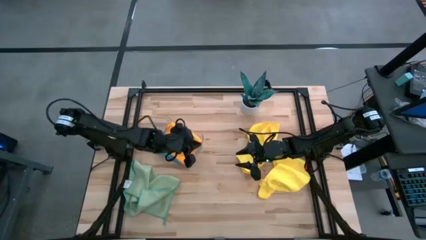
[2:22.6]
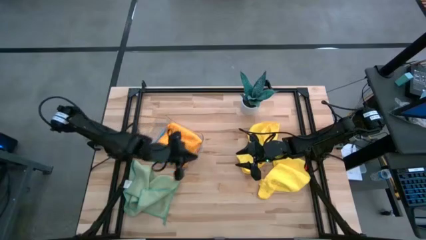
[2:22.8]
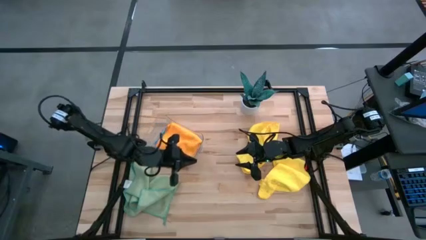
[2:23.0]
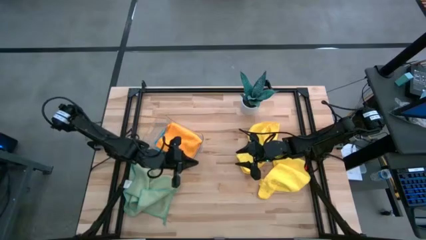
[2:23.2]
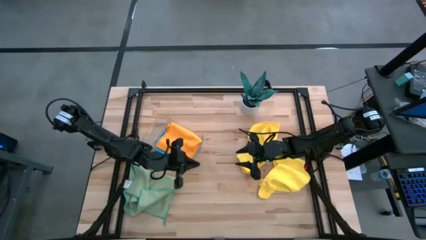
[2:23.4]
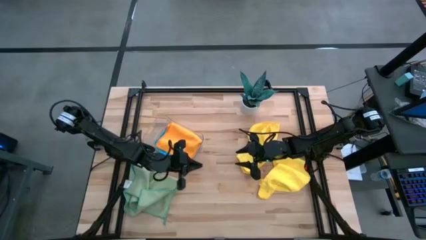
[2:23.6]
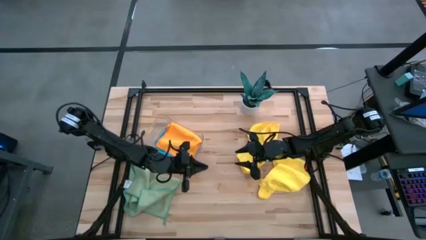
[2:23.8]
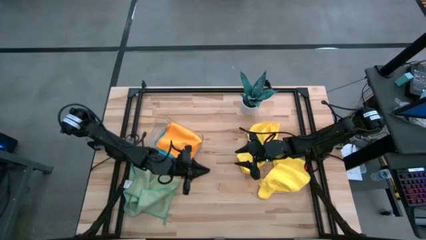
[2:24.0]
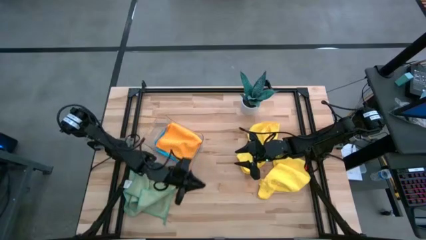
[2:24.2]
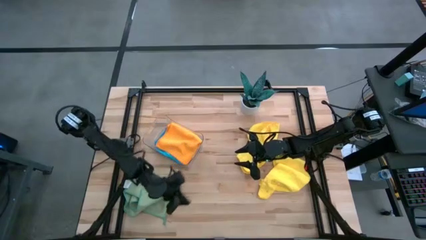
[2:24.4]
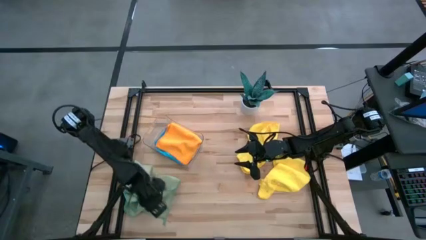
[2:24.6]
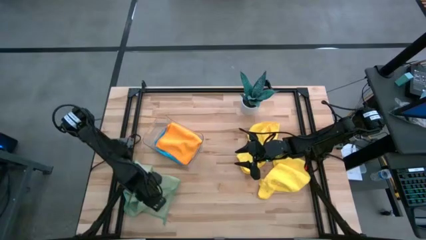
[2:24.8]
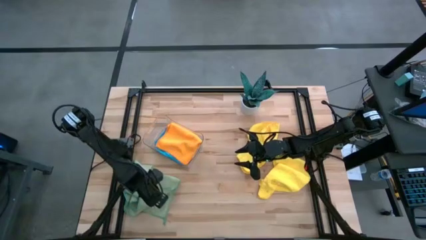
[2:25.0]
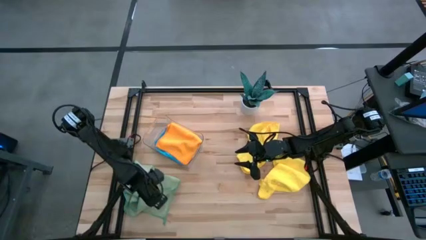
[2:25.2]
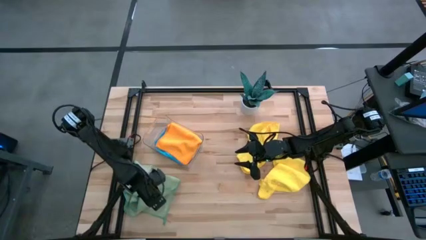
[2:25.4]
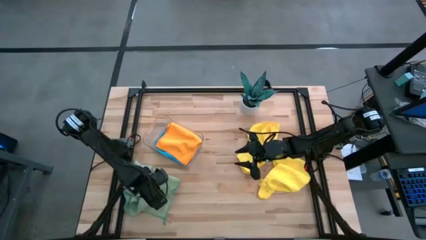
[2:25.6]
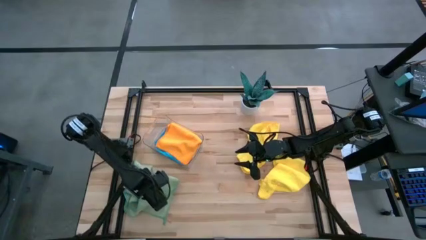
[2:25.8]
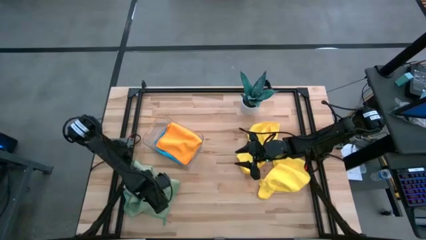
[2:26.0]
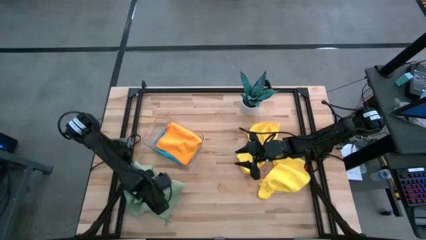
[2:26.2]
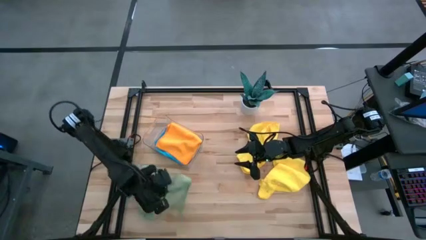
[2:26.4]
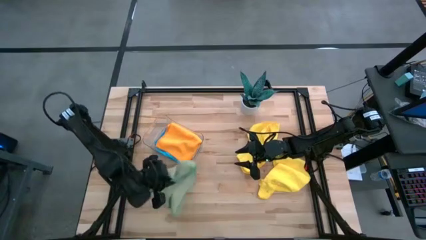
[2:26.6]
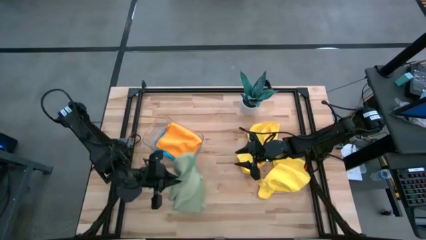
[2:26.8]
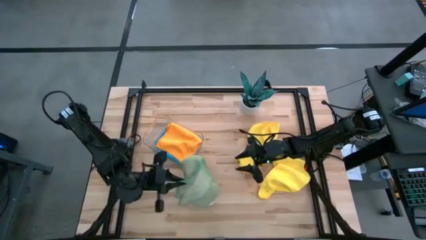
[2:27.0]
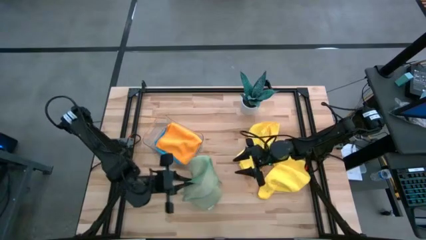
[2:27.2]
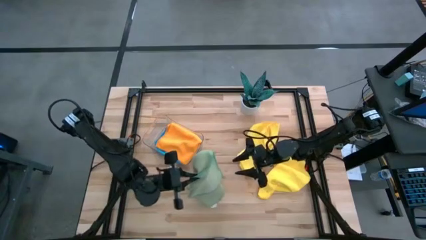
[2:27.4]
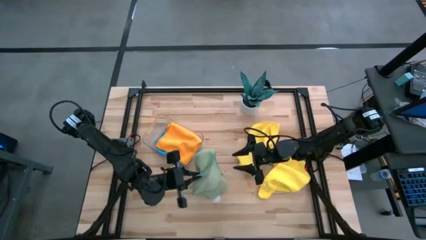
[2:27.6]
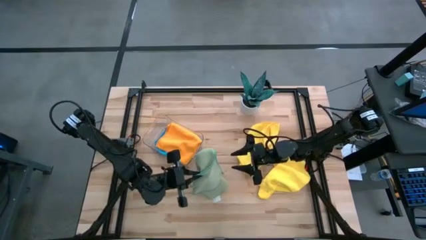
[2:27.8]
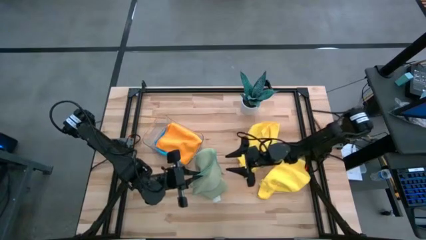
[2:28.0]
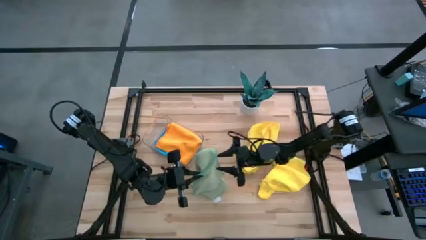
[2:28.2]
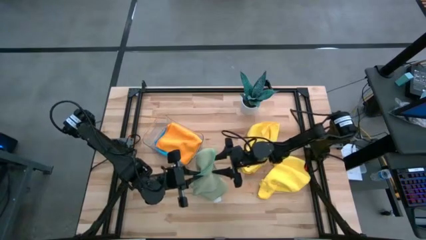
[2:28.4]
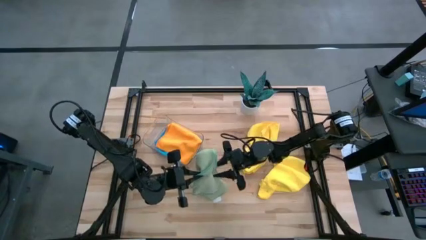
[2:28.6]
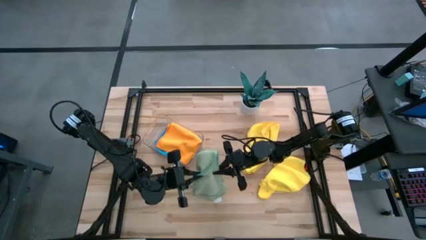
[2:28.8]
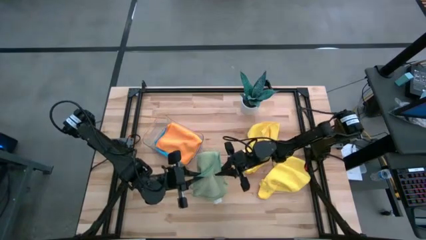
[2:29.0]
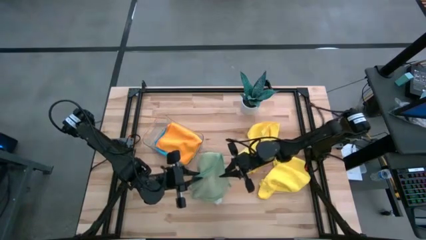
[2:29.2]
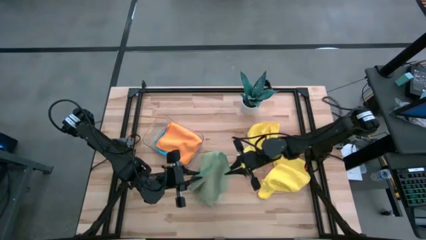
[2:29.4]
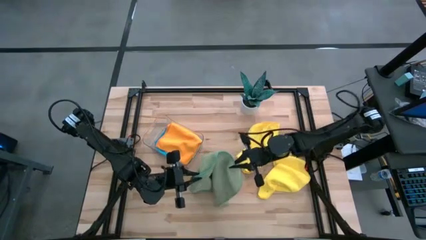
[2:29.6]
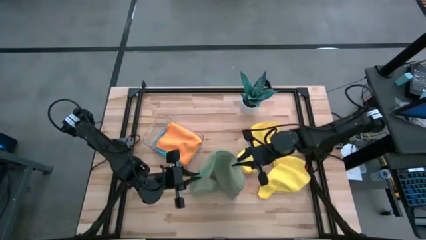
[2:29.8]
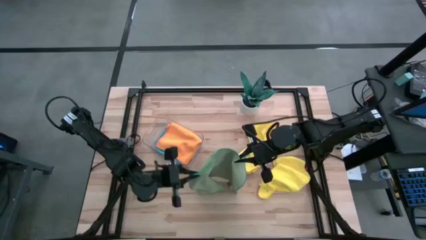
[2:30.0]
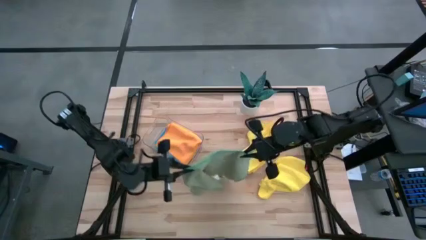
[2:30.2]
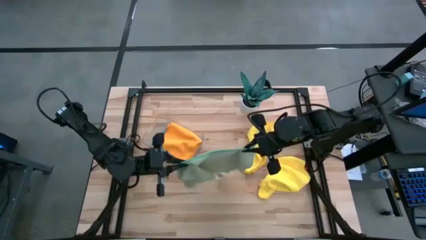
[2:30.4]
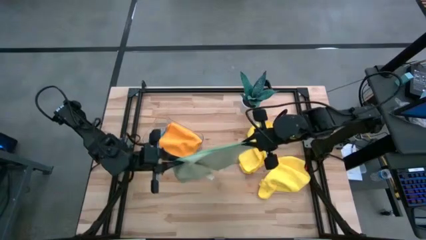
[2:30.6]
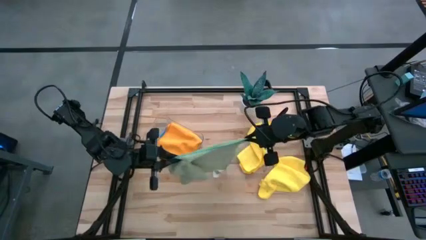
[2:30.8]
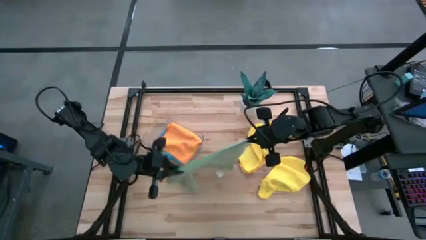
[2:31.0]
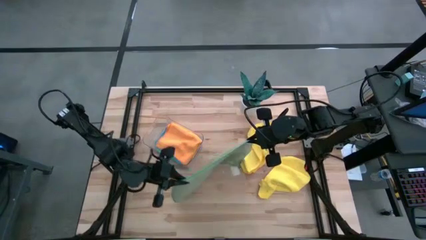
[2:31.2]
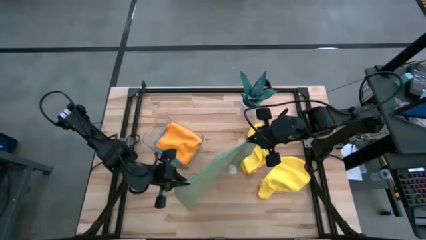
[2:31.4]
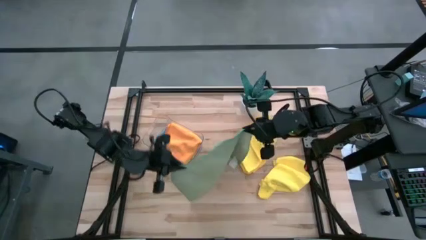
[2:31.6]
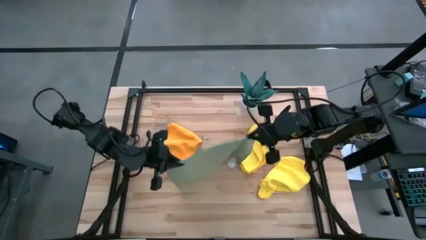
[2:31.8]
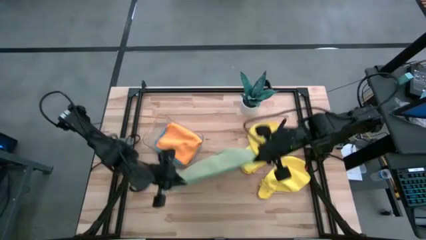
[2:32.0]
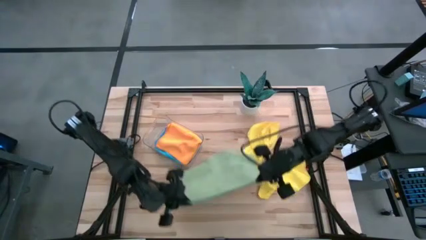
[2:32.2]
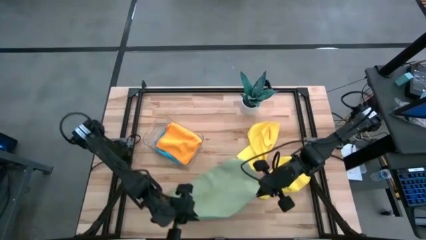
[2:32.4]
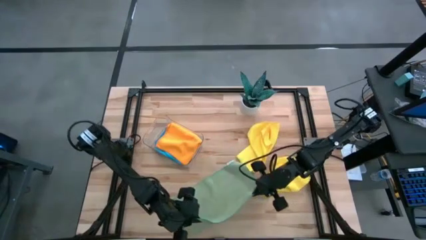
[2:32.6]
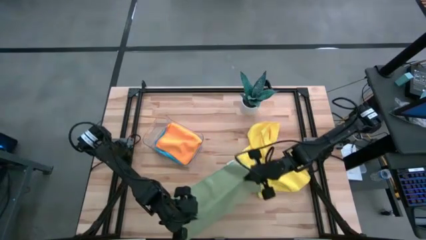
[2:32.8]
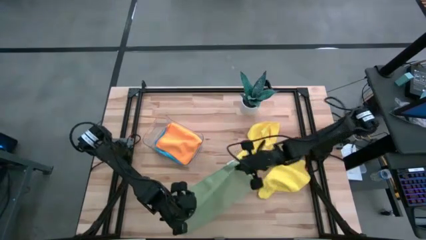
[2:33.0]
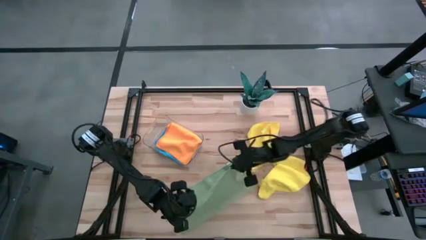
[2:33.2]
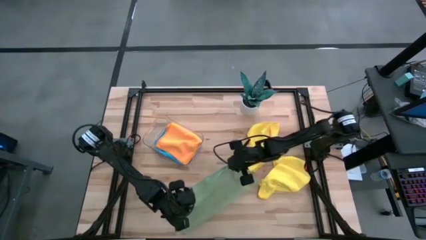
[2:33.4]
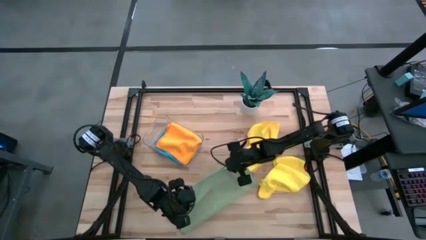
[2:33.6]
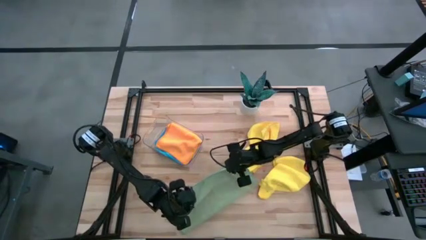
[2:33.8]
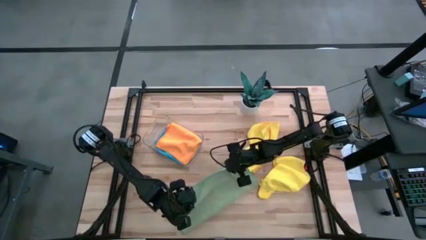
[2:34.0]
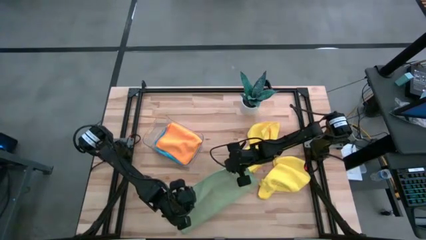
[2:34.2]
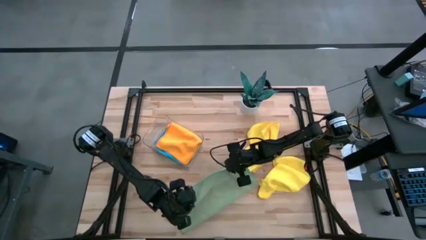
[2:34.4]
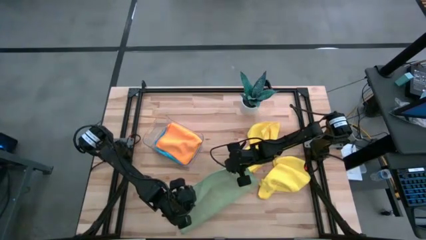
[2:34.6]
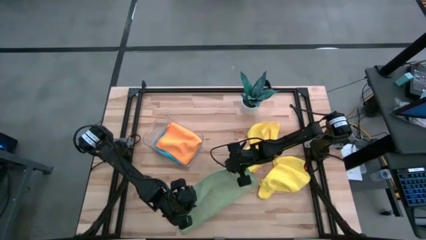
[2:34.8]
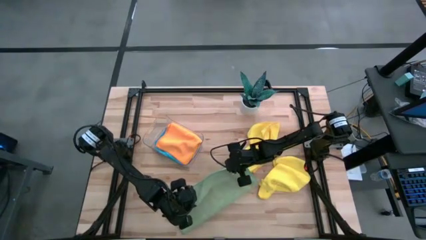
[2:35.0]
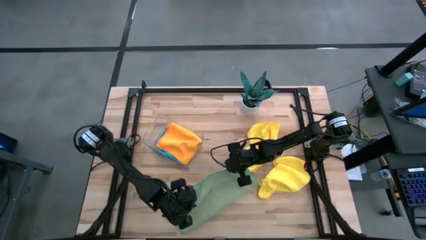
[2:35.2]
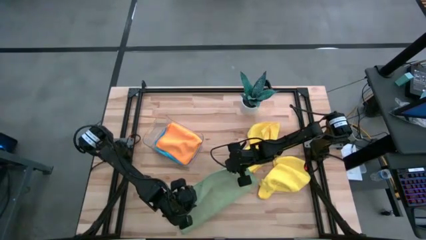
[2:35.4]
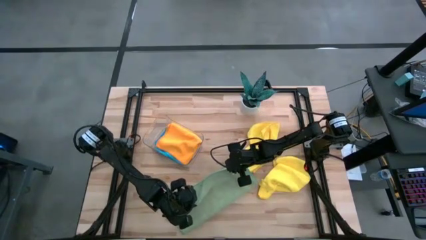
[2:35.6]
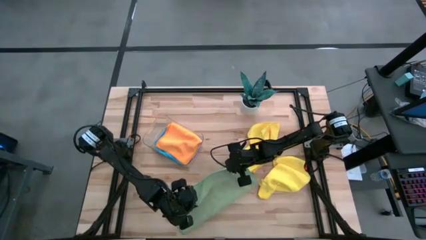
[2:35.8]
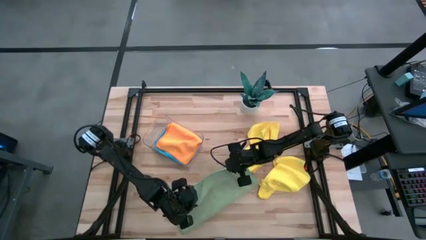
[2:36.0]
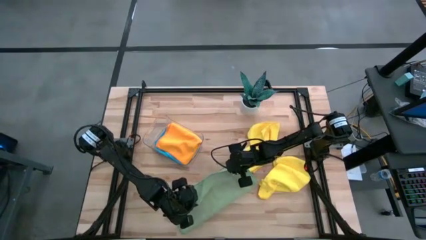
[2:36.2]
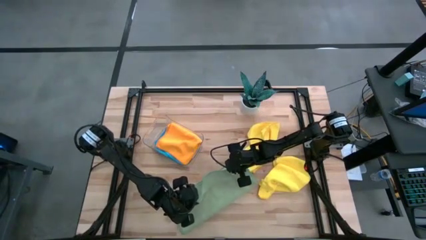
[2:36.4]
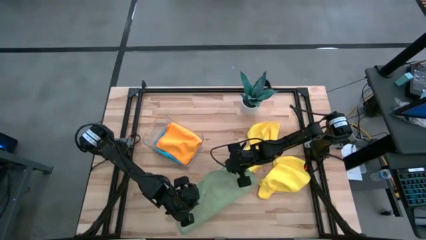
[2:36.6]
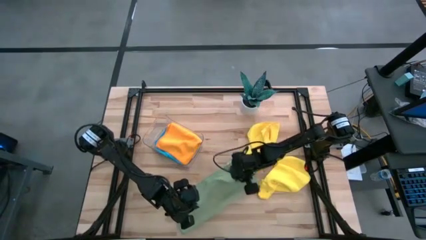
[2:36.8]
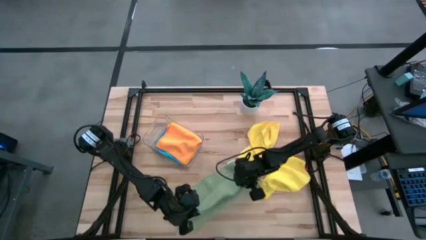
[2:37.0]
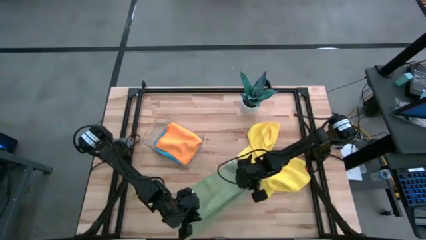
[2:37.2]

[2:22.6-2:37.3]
Task: Fold microfiber towels
Fold the green microfiber cloth
